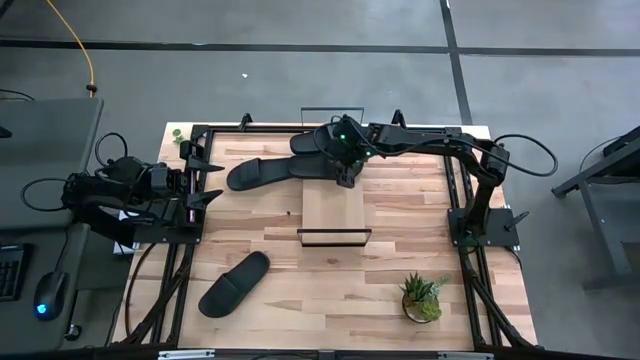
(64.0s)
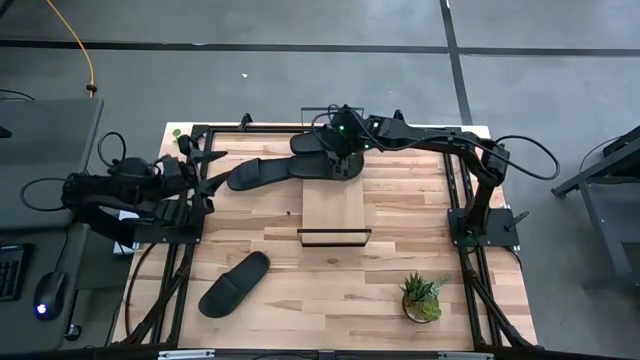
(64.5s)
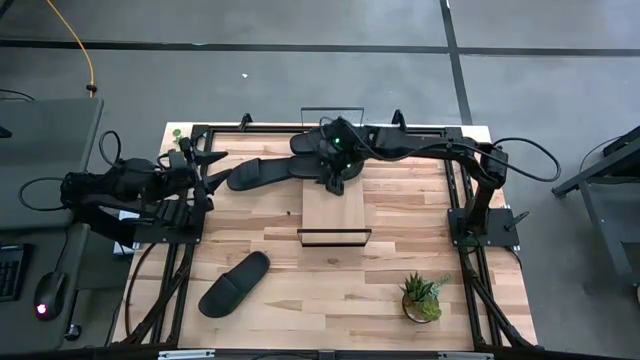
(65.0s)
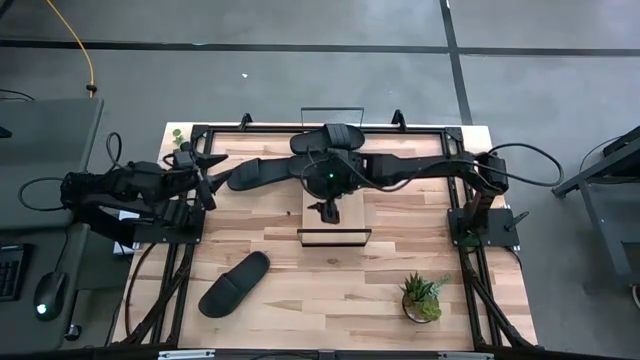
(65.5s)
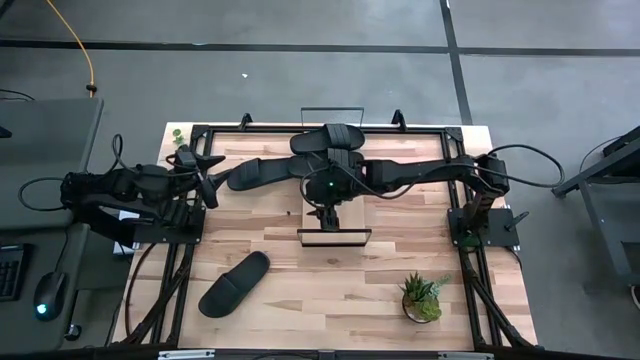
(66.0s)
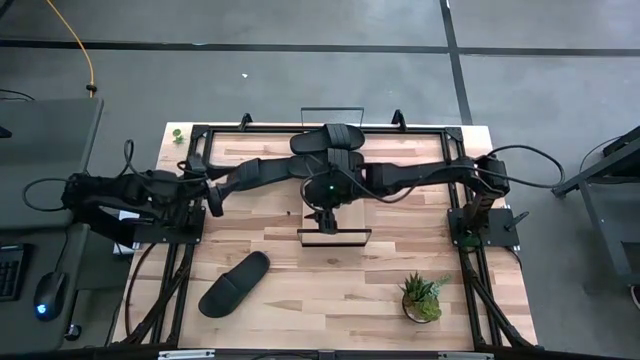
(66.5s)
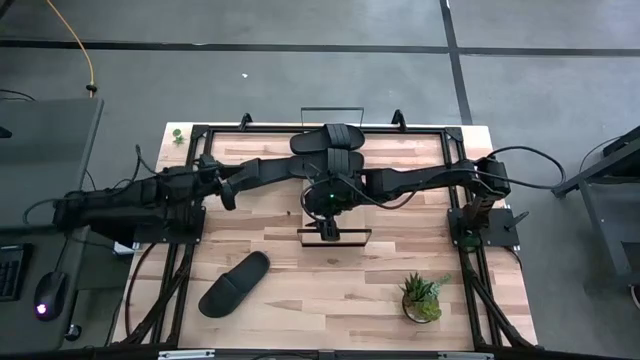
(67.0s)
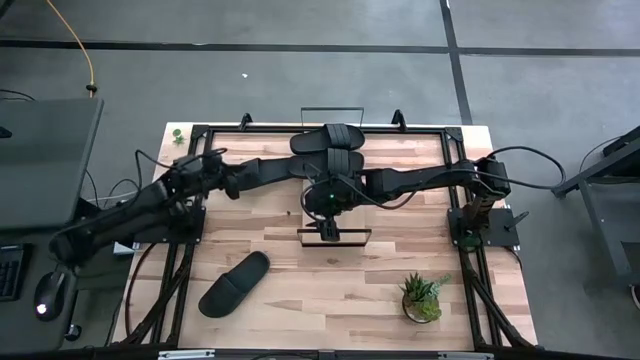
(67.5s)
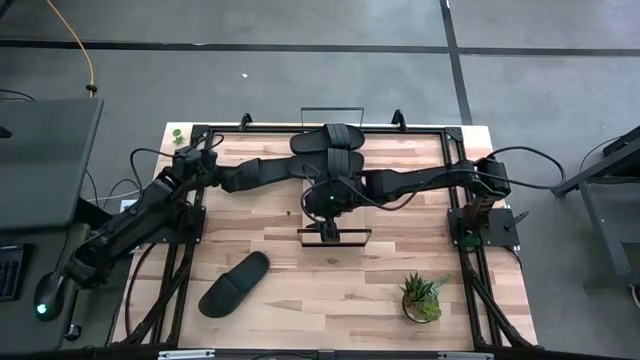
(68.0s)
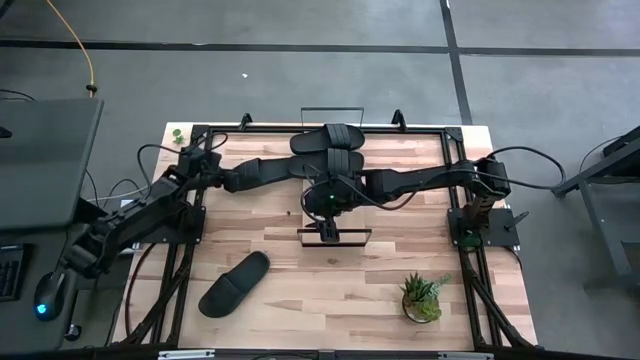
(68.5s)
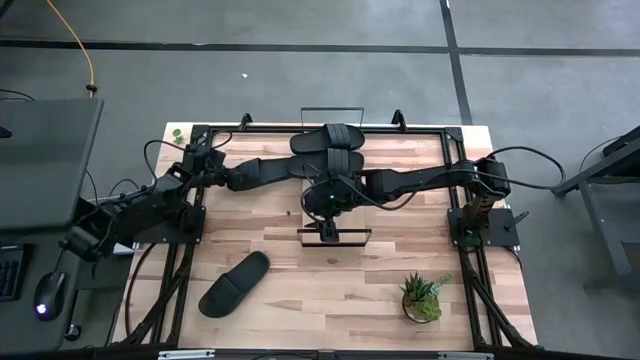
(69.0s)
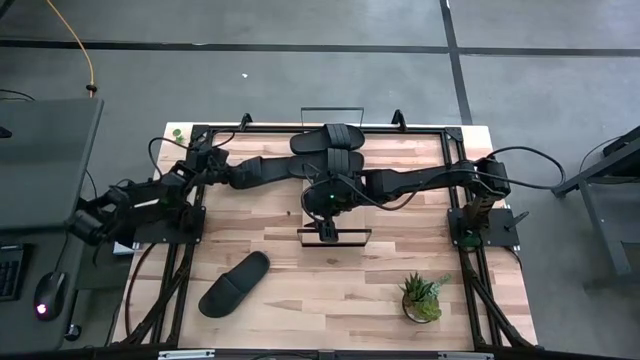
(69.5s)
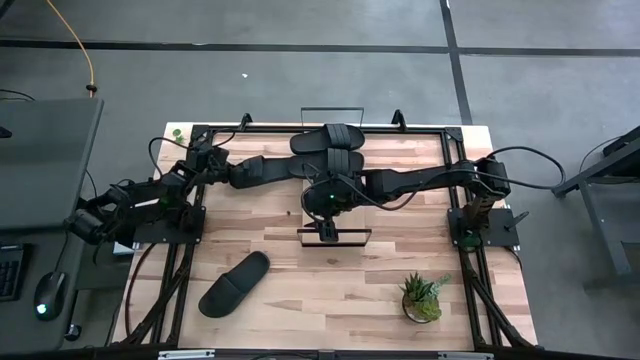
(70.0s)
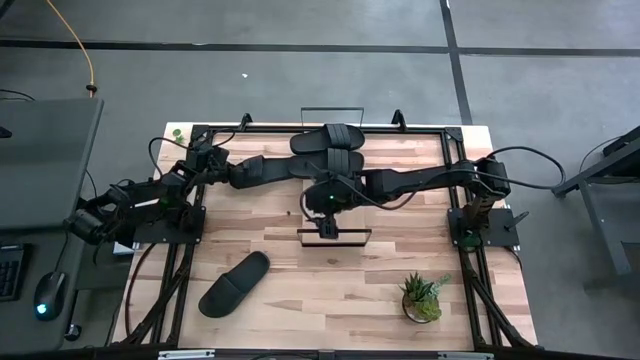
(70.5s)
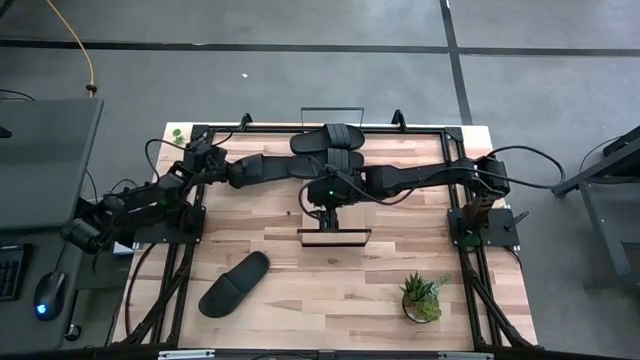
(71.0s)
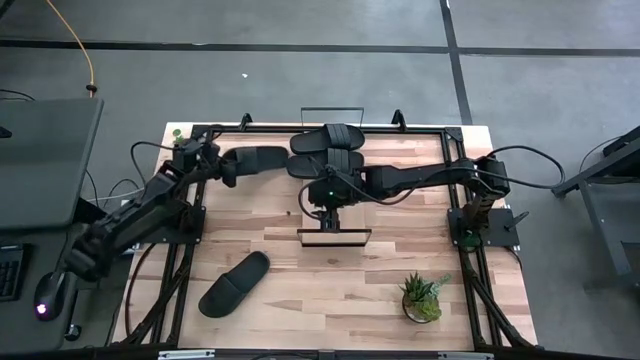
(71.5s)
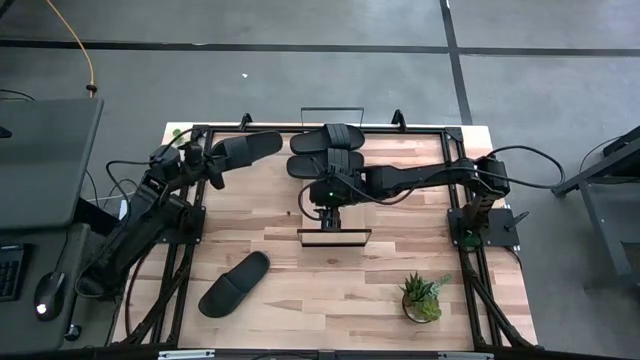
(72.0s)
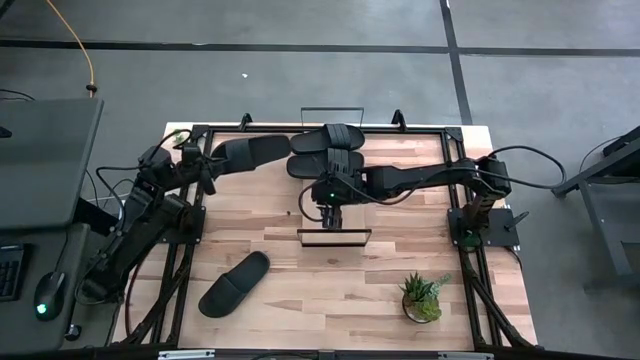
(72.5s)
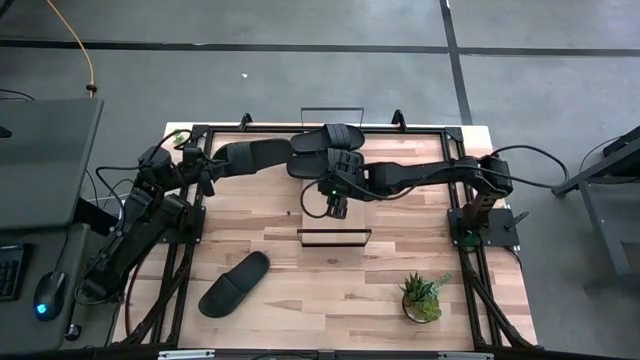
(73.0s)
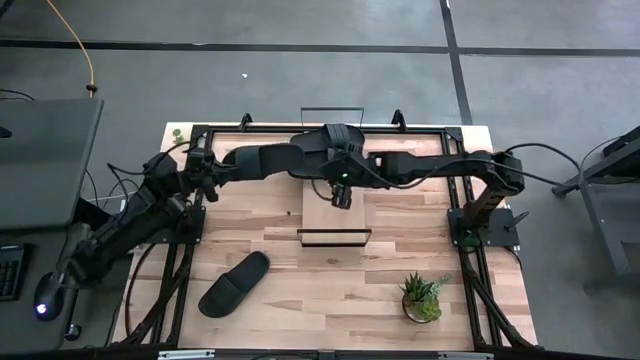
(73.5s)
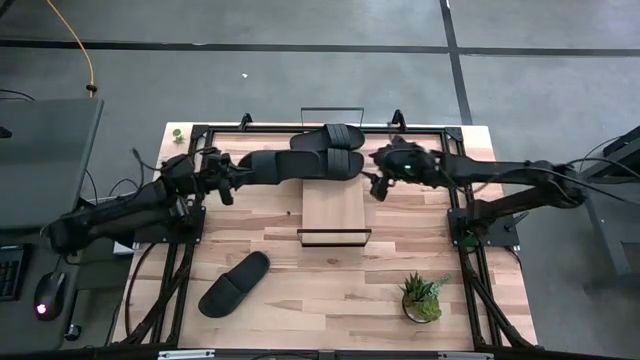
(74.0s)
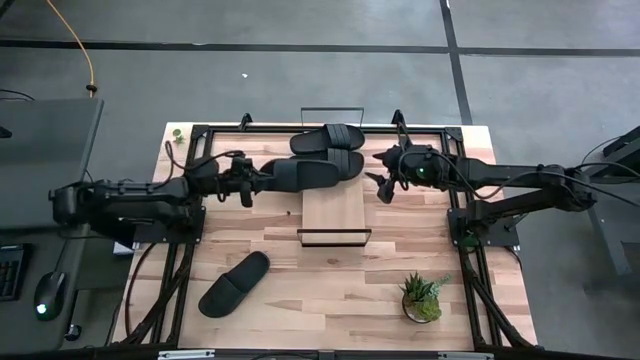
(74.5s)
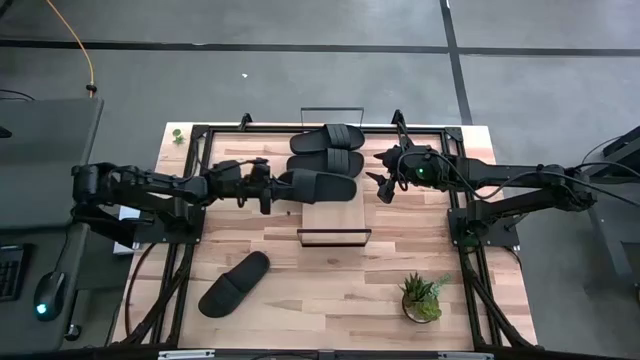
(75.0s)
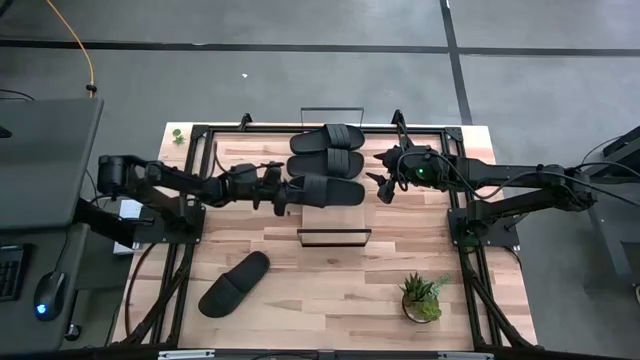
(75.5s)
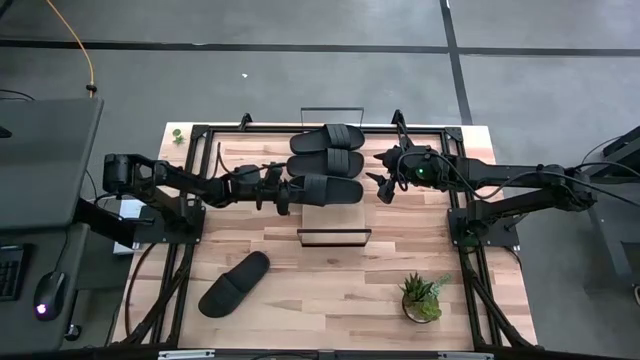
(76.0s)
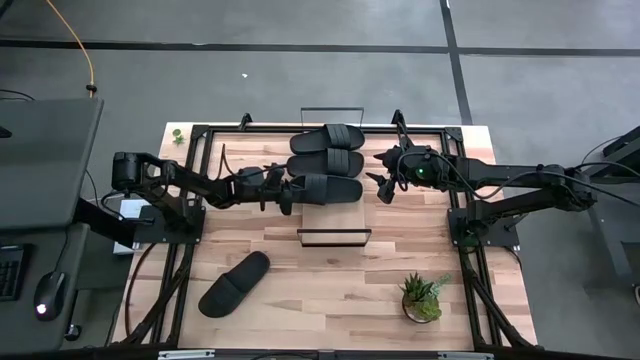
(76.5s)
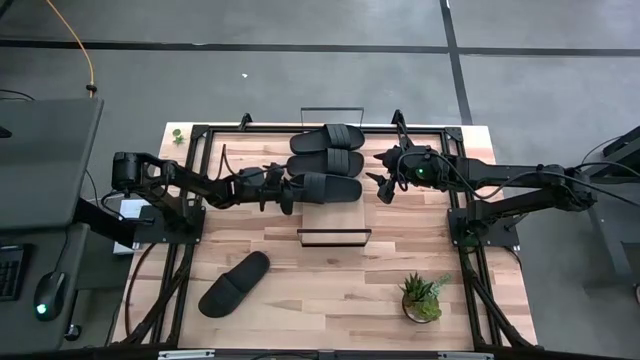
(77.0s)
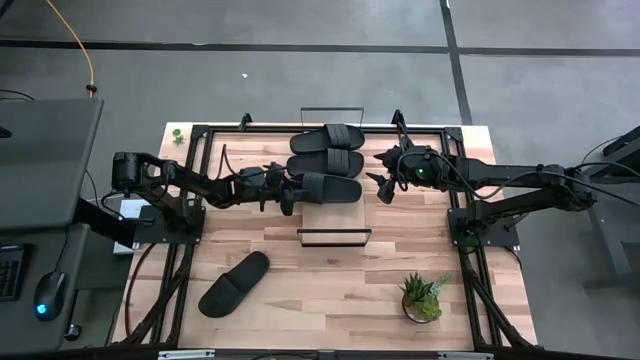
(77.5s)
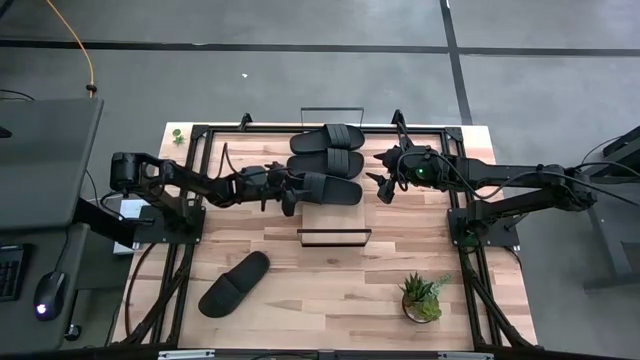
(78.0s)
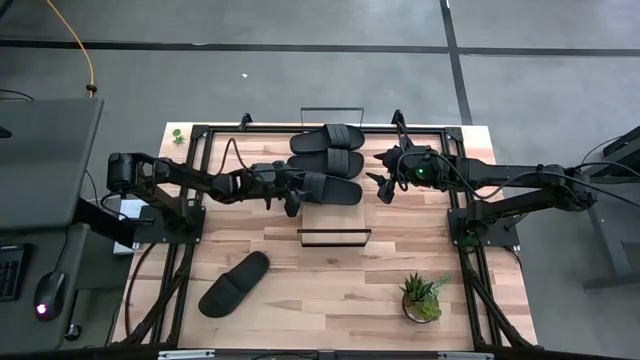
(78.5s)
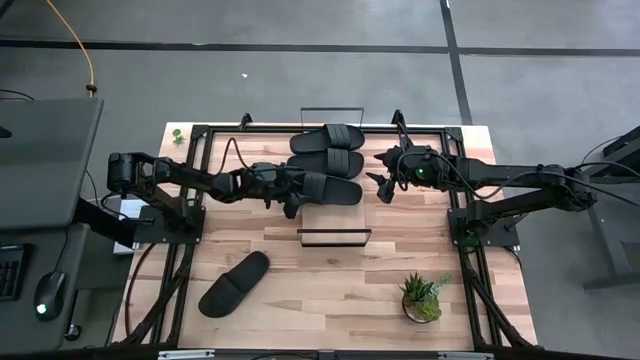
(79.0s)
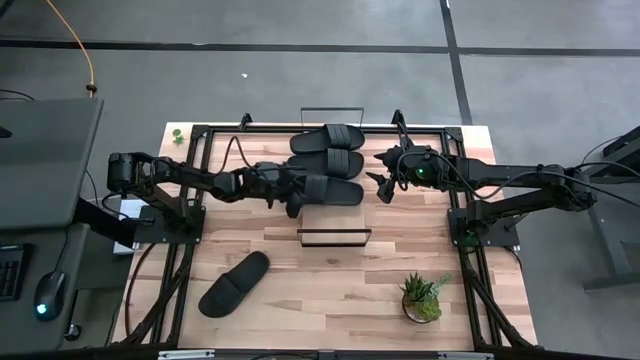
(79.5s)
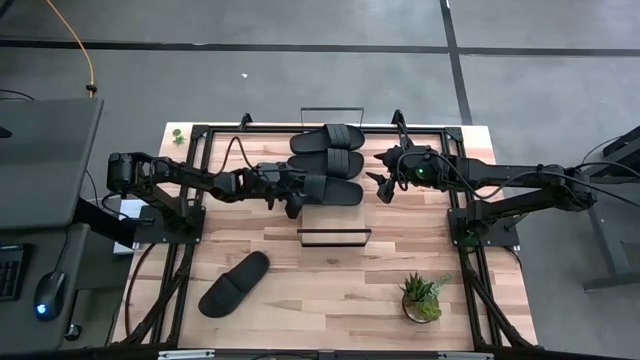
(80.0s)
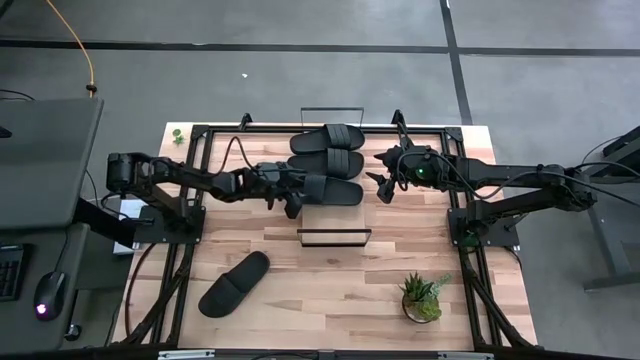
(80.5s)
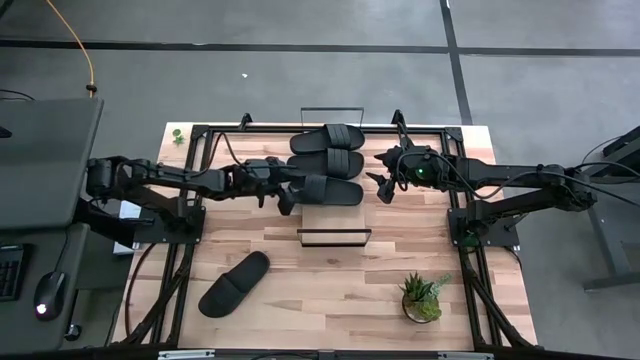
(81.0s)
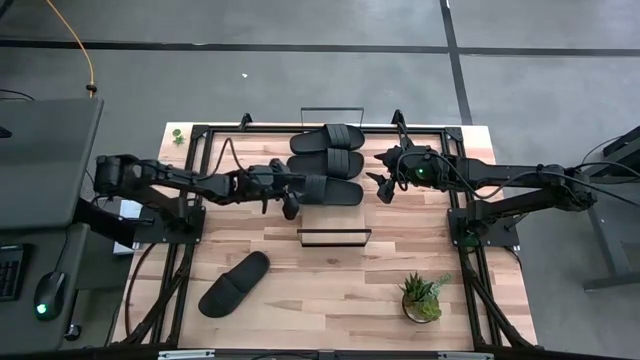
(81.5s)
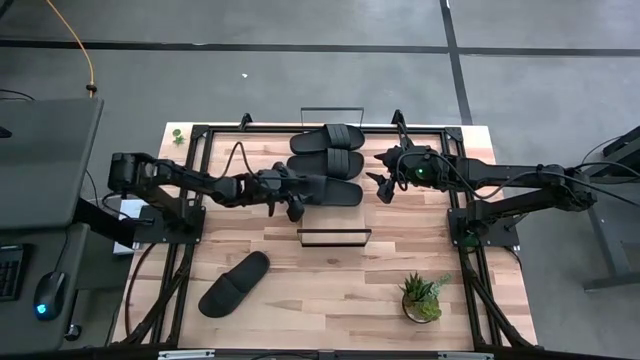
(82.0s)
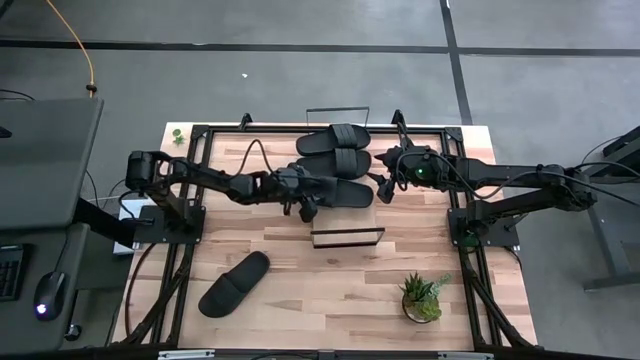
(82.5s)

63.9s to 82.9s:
Task: Pick and place slides into the shelf
Put the black slide on the shelf

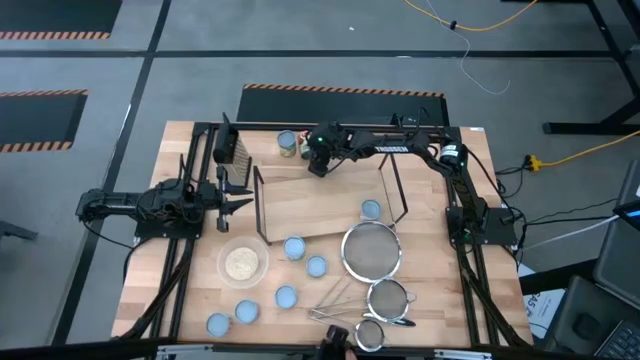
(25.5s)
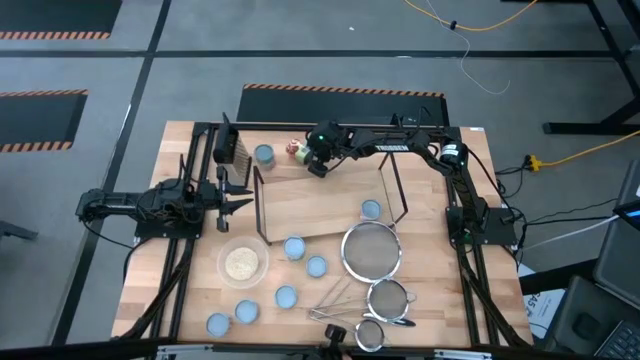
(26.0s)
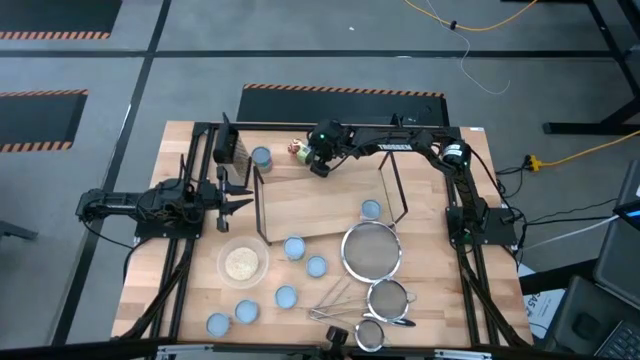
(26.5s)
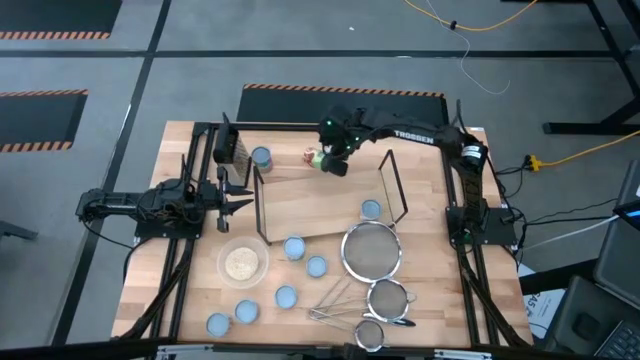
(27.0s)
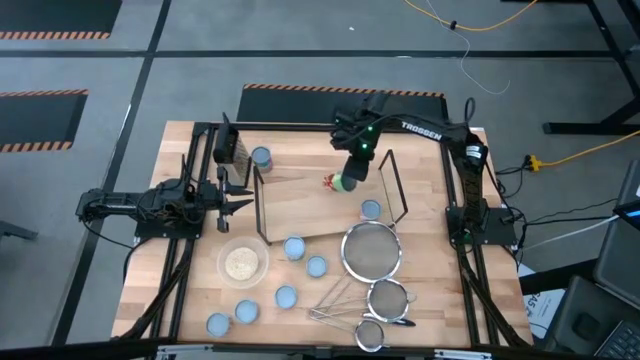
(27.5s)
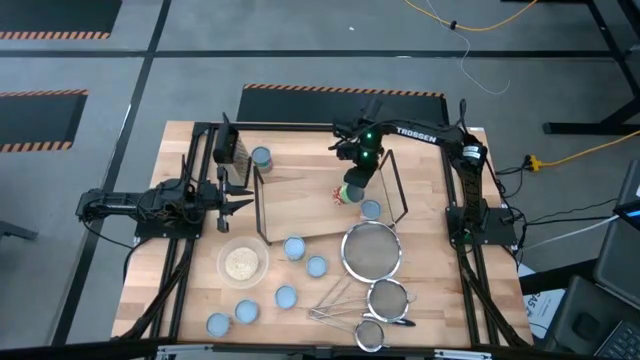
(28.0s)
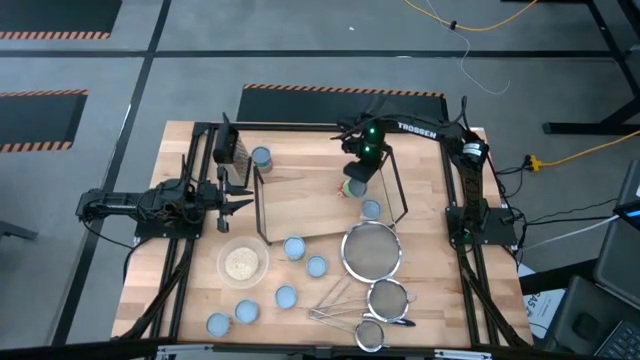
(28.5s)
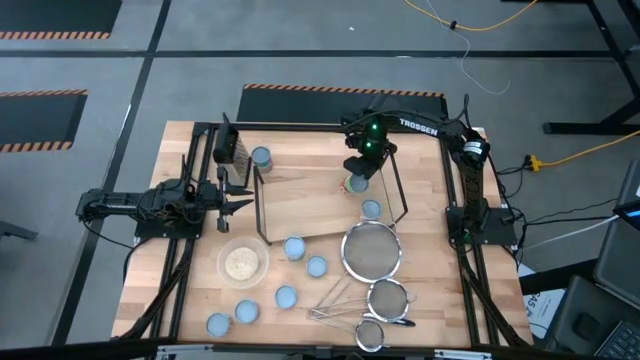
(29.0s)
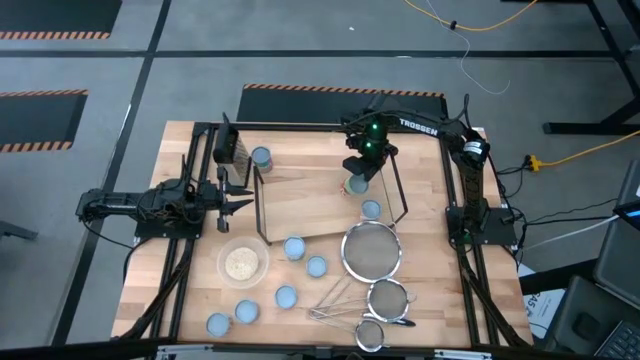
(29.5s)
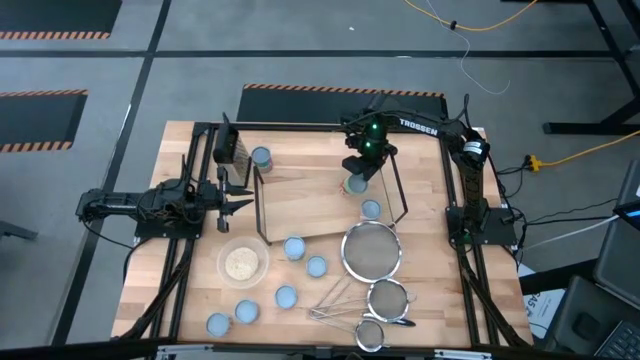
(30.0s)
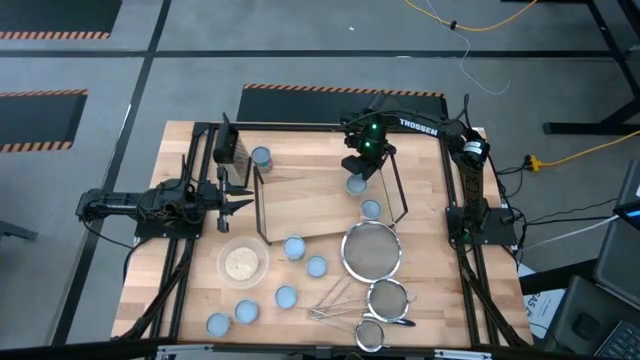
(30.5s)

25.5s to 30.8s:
Task: Pick and place cans onto a shelf
Put the large yellow can on the shelf
